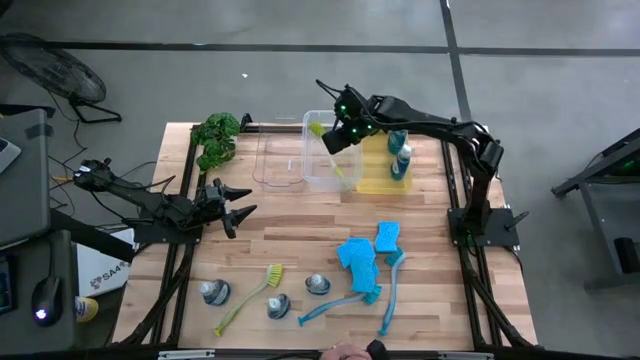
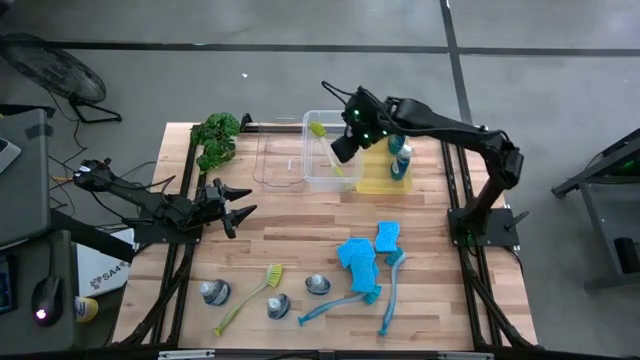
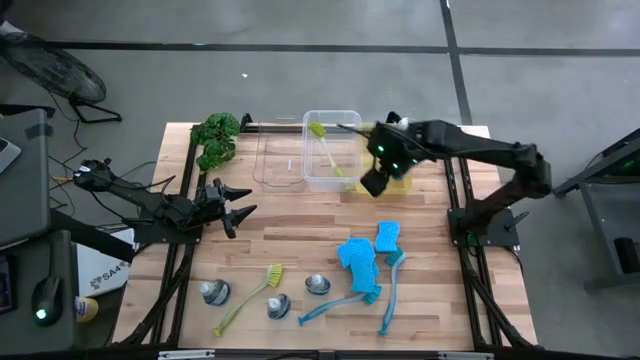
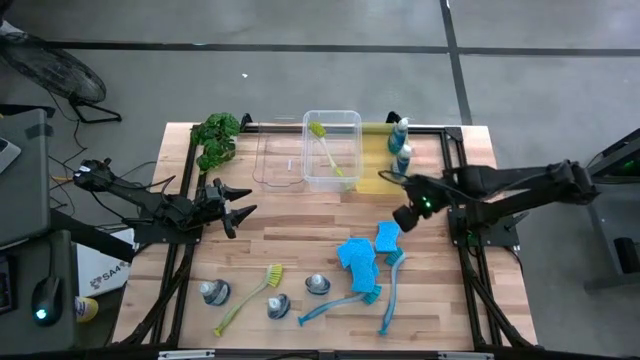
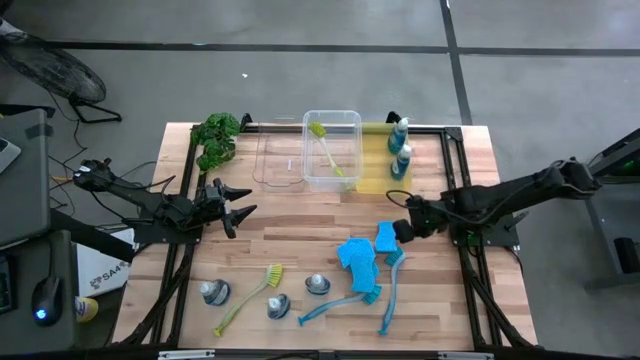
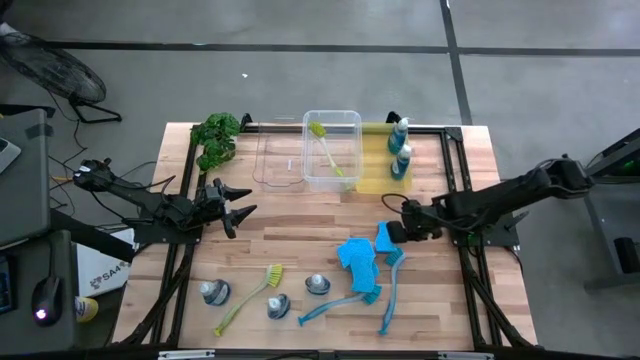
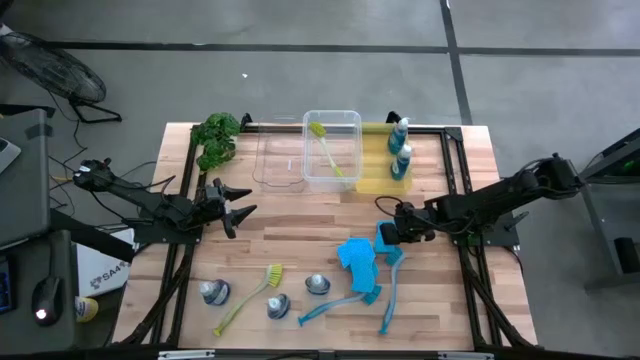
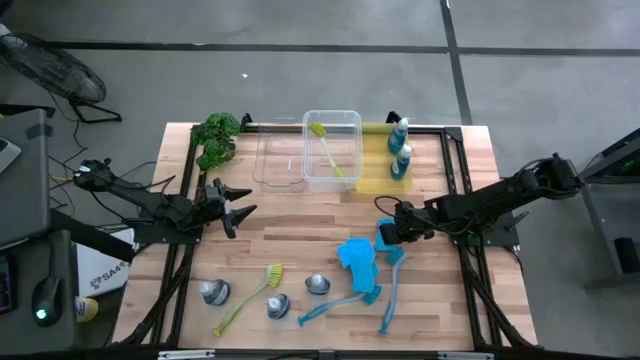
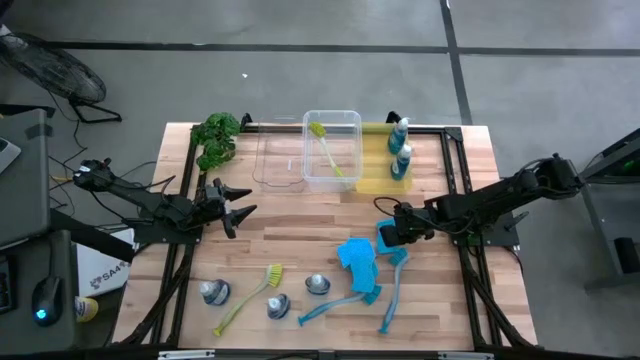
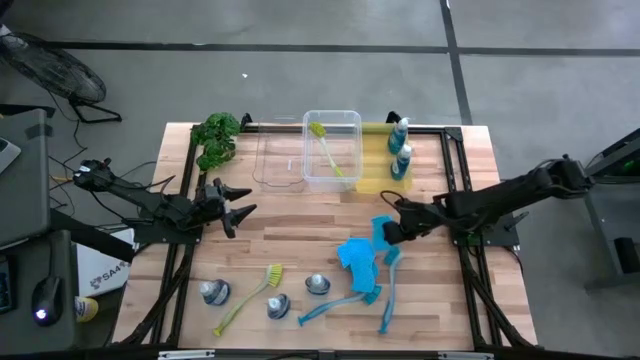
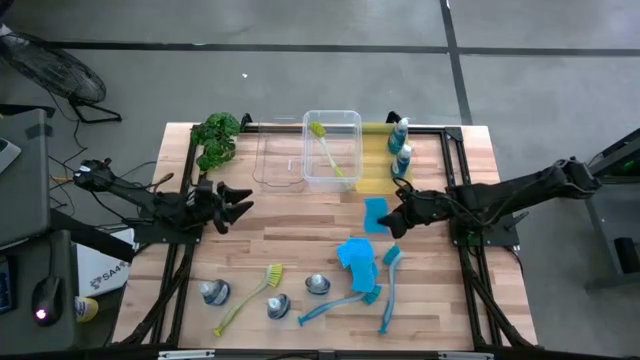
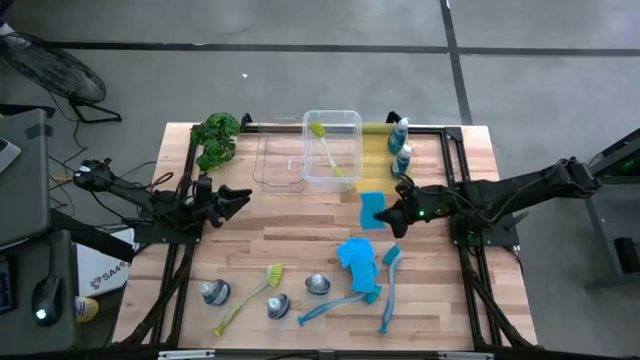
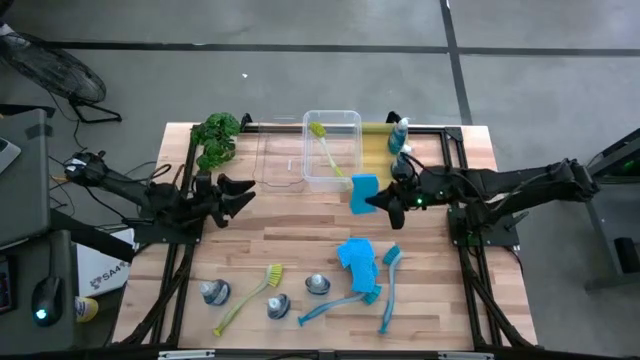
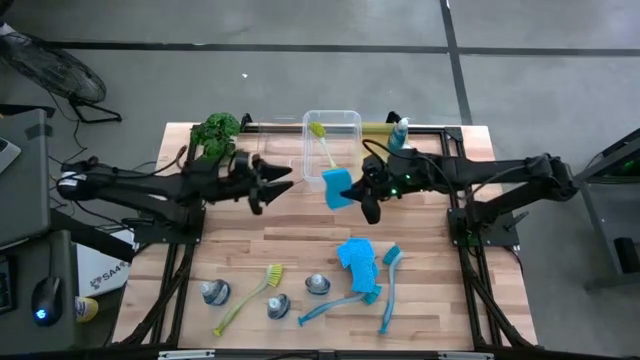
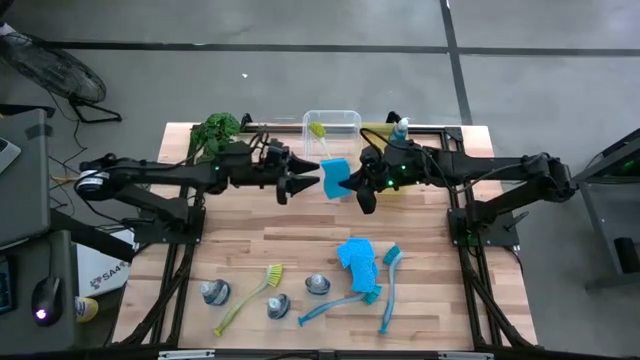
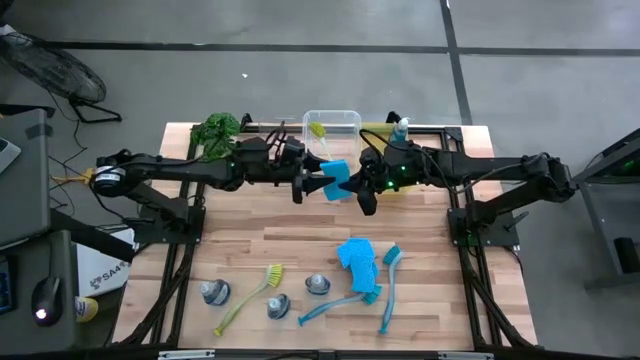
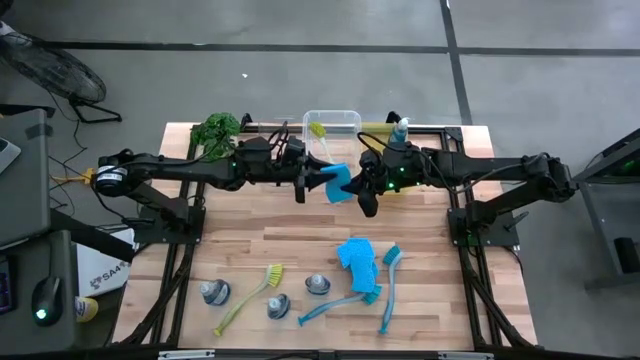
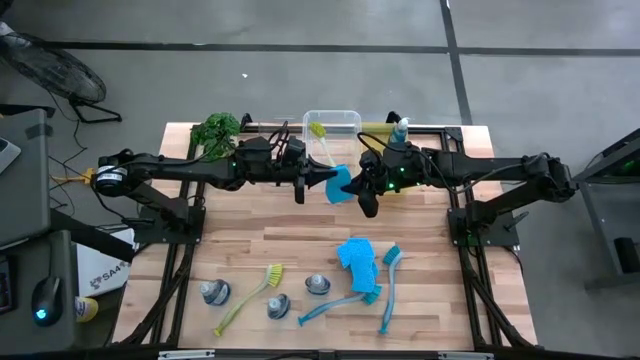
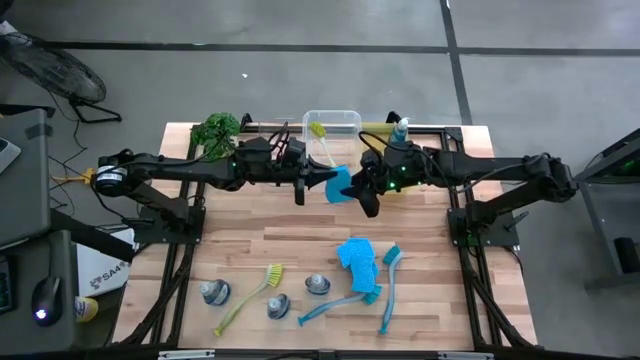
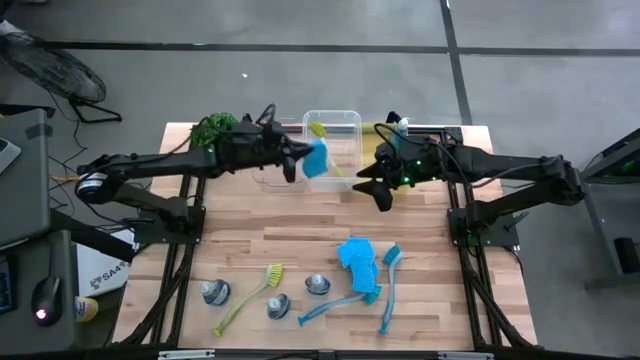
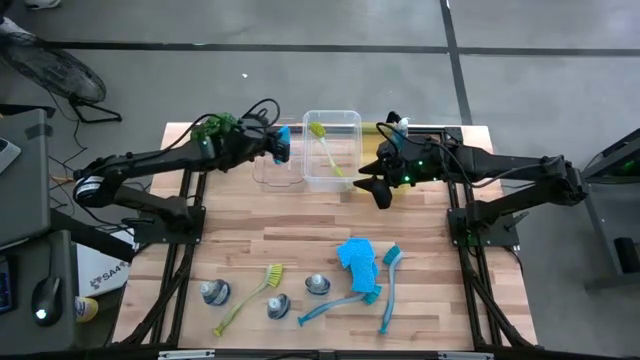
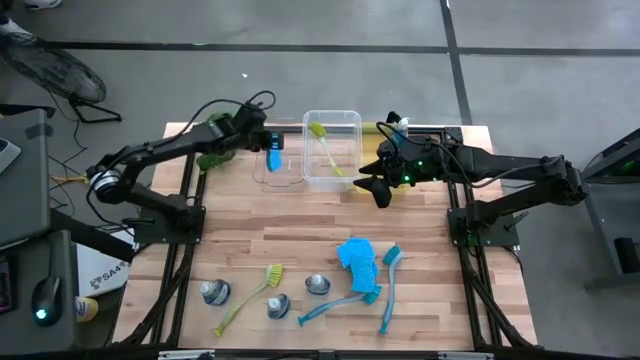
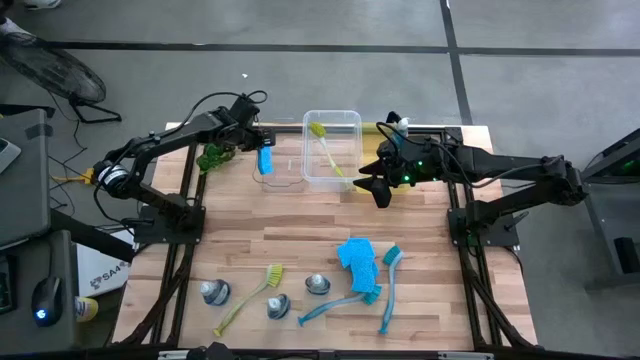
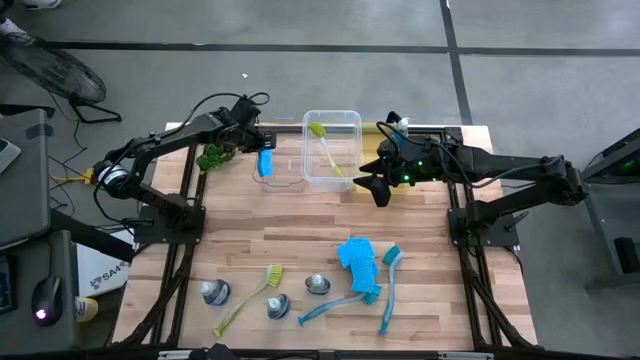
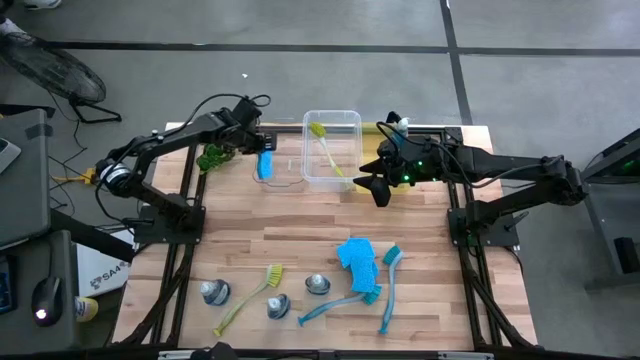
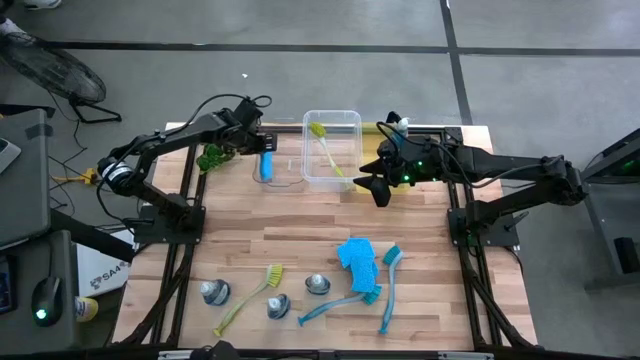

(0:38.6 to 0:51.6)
Task: Pick & Place Kitchen Sink Supplies
Put the sponge into the white bin

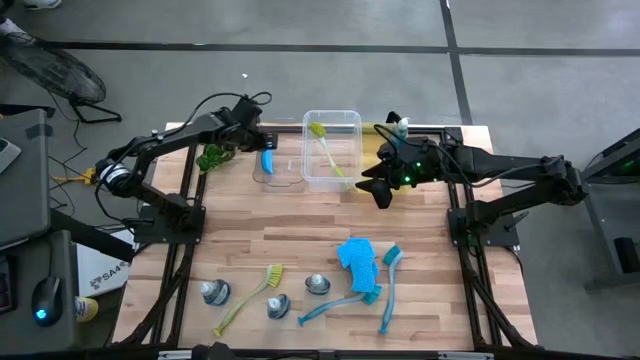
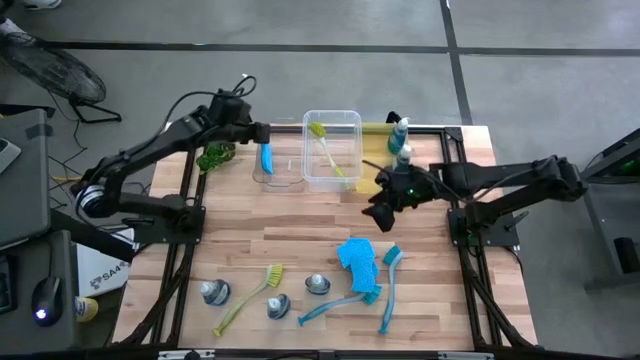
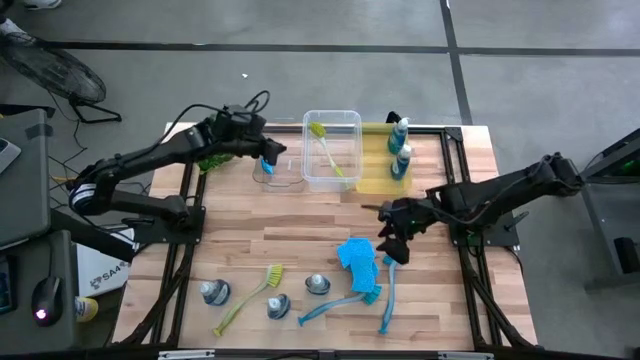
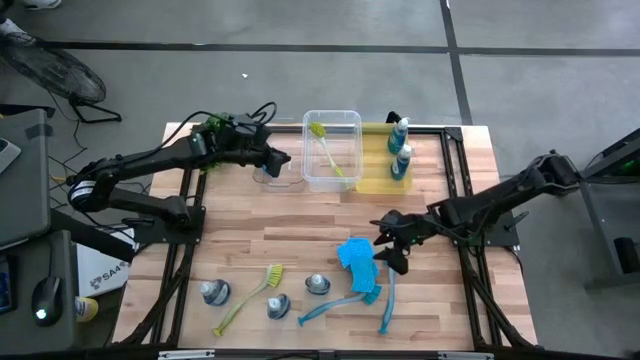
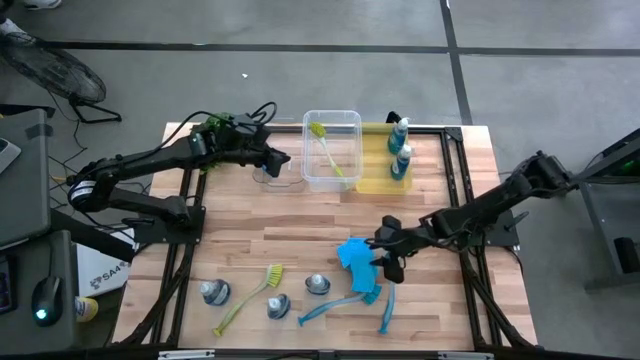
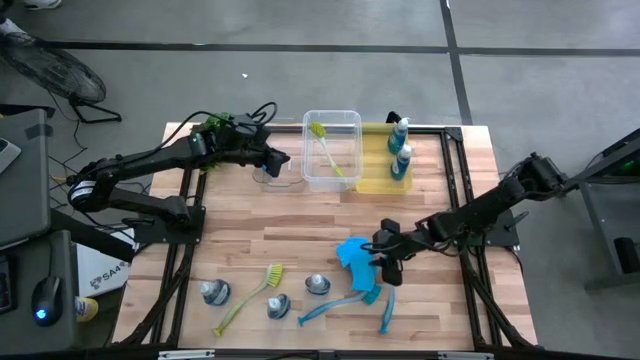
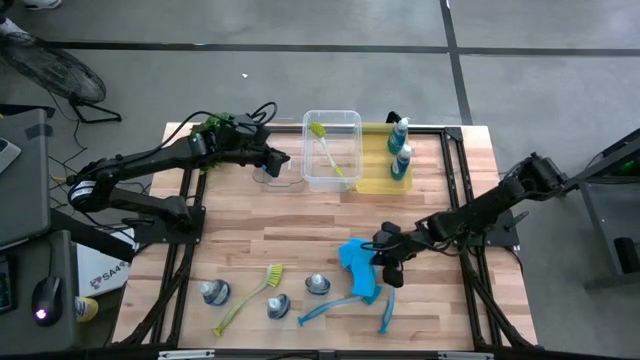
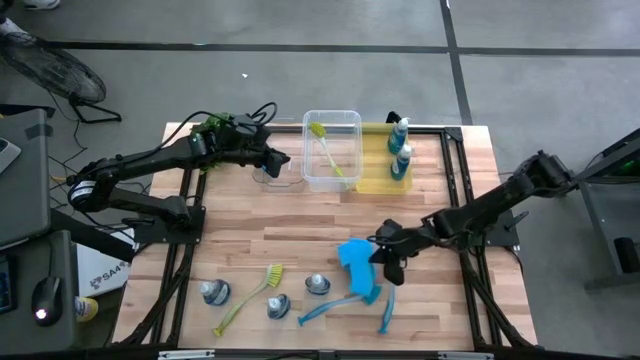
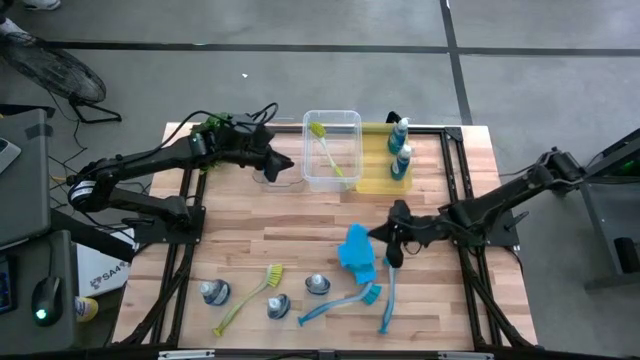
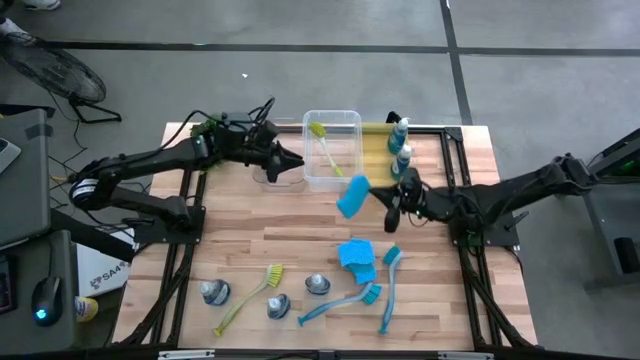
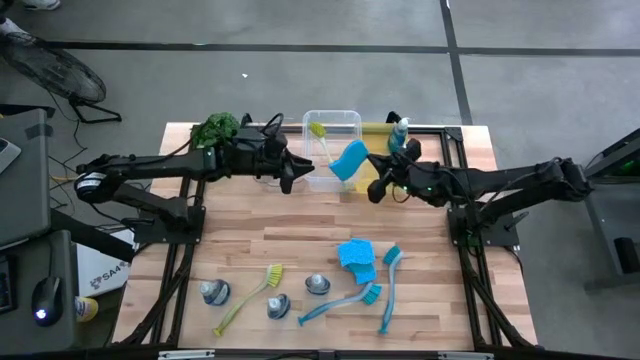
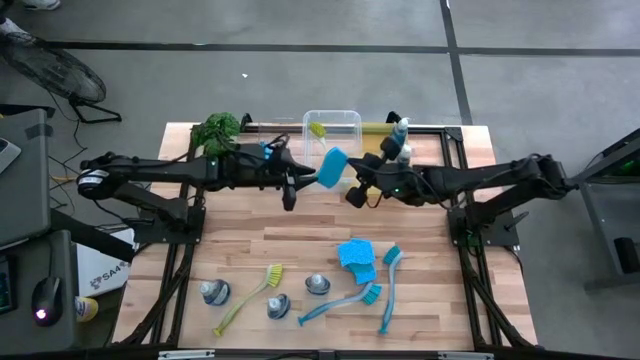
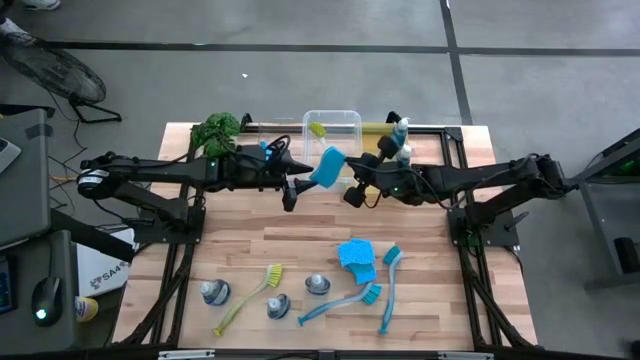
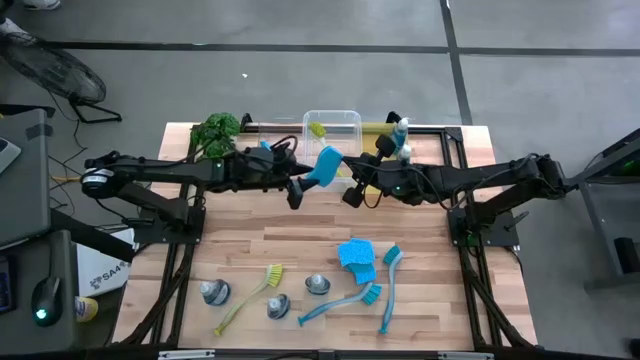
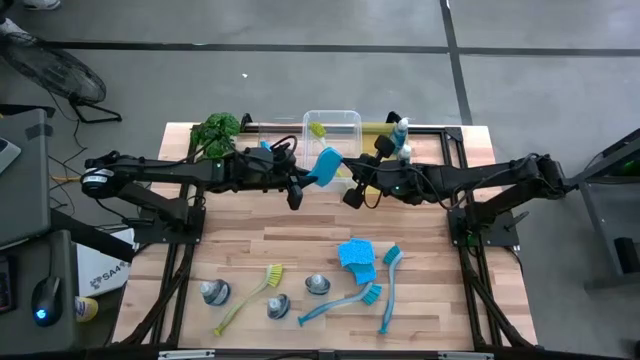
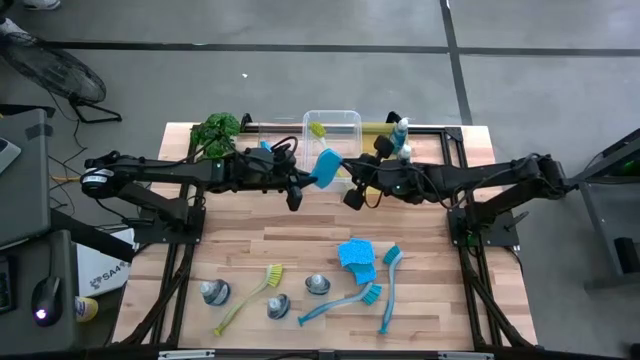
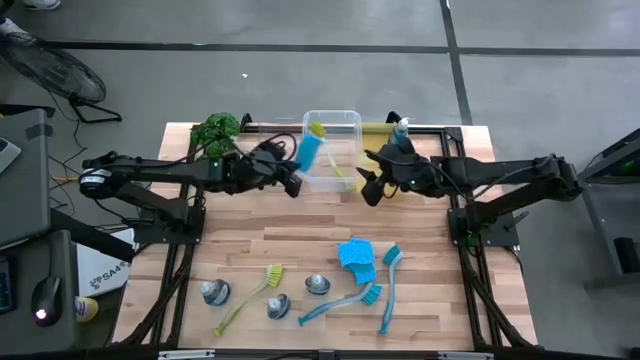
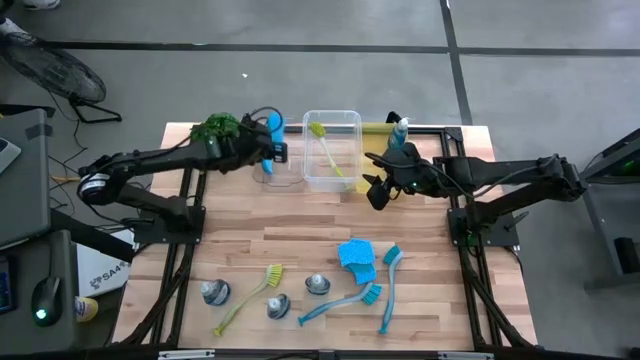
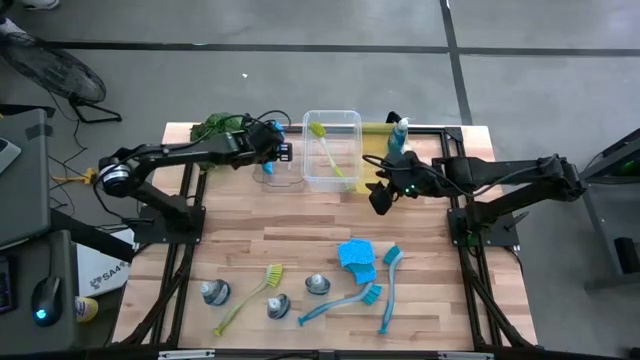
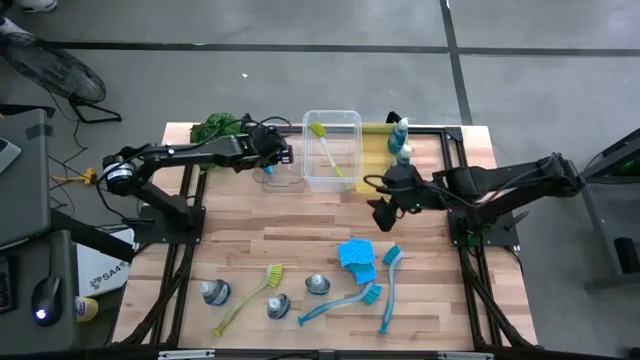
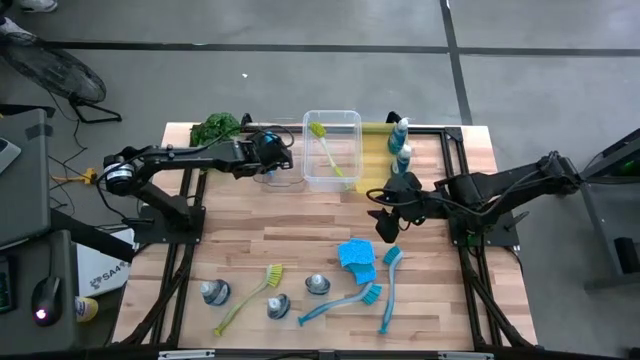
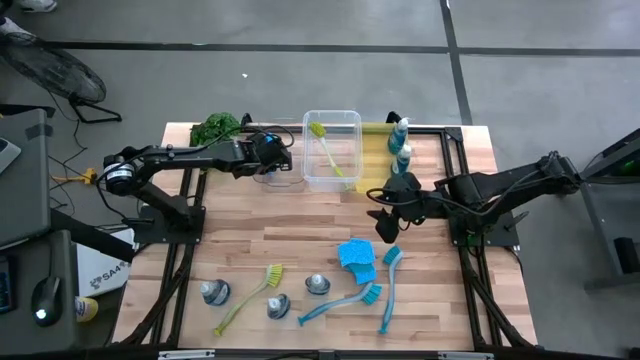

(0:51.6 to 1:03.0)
Put the sponge into the transparent bin
